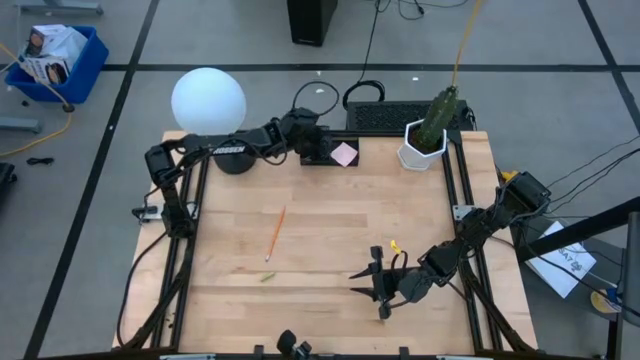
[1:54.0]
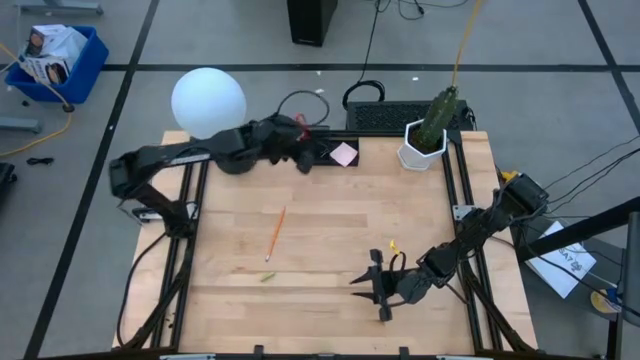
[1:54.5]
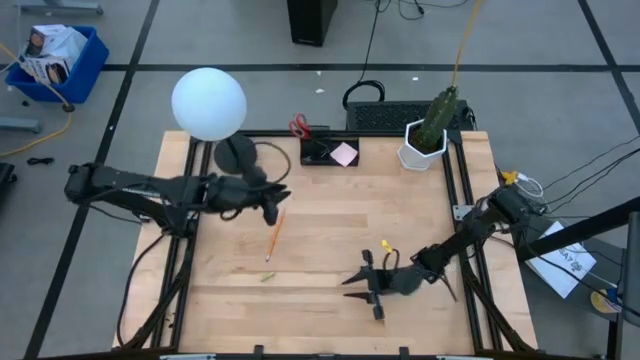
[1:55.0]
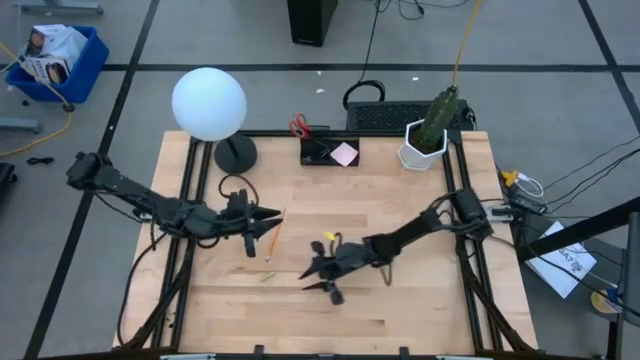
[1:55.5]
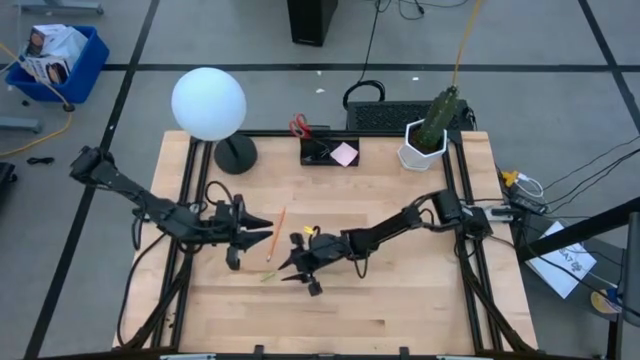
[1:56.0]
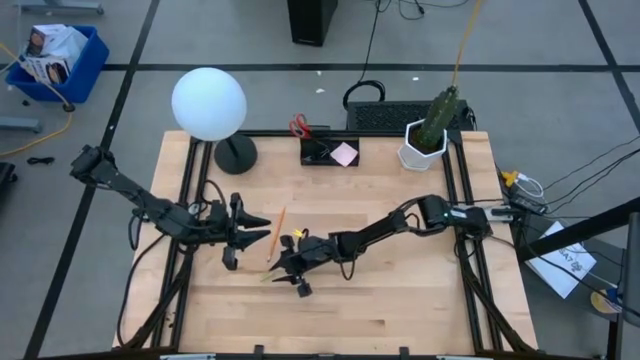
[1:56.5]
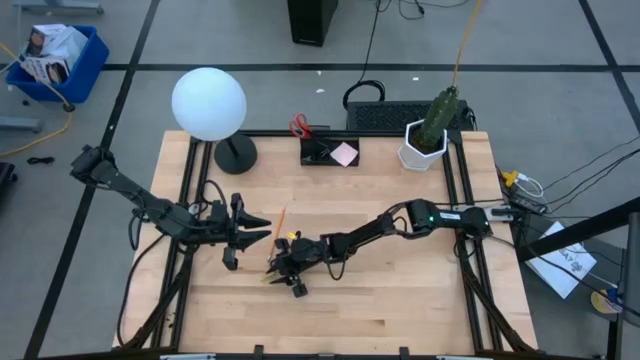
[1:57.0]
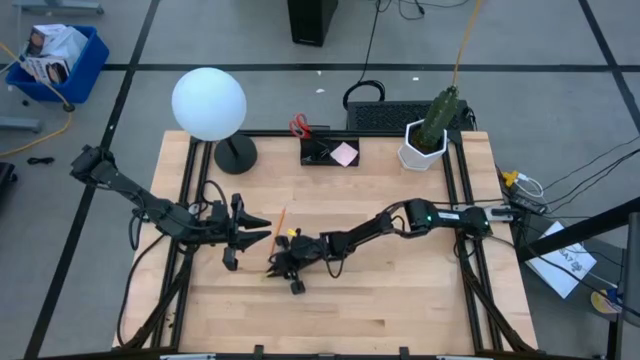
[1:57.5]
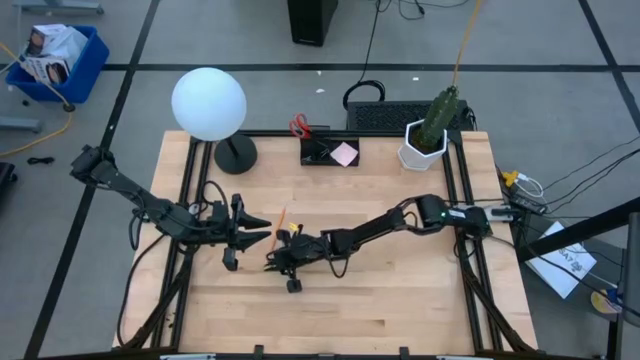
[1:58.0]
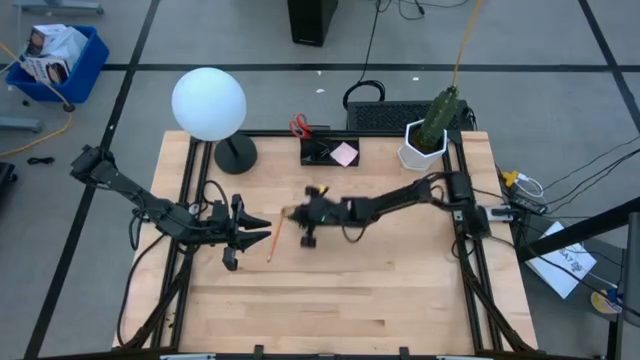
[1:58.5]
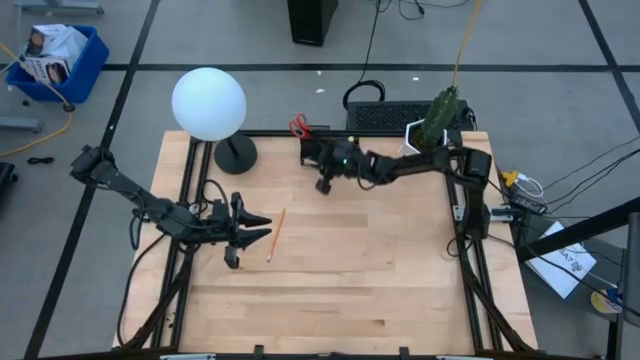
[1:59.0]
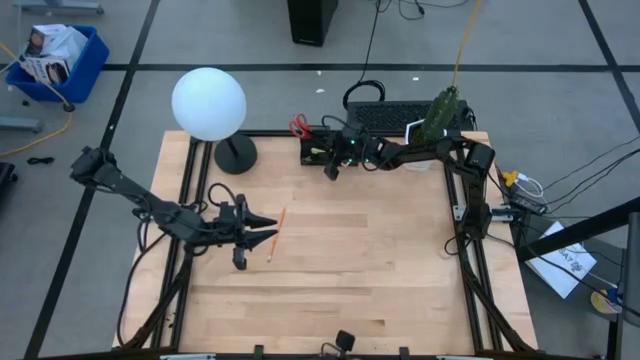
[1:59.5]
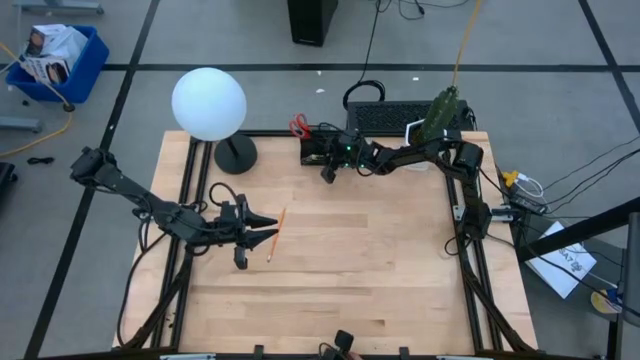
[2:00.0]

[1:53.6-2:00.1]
Task: Pick and place office supplies into organizer
Put the eraser into the desk organizer

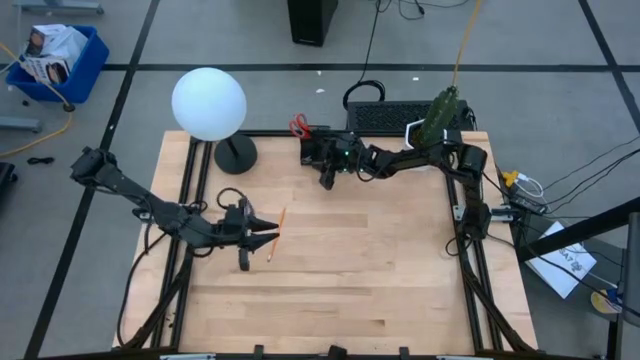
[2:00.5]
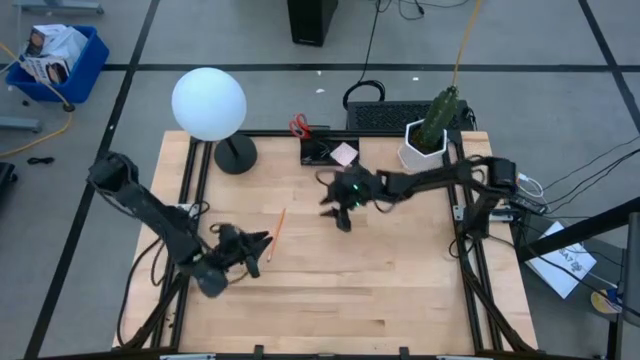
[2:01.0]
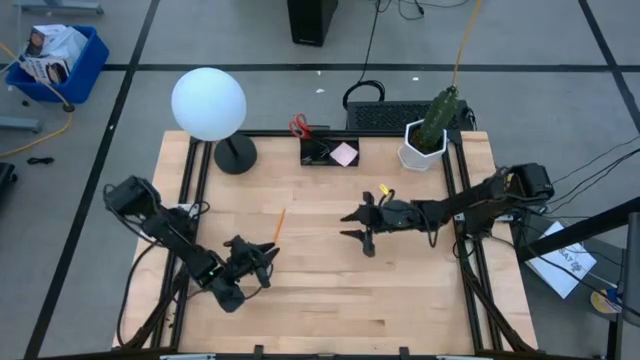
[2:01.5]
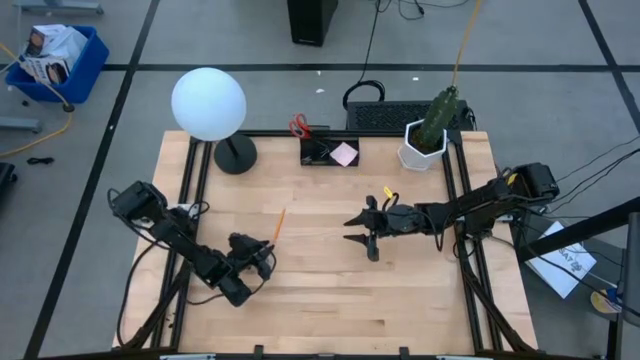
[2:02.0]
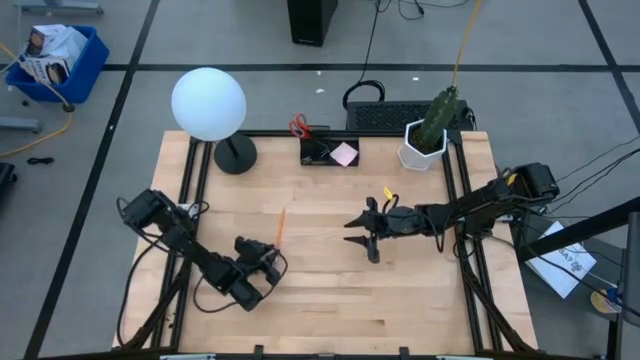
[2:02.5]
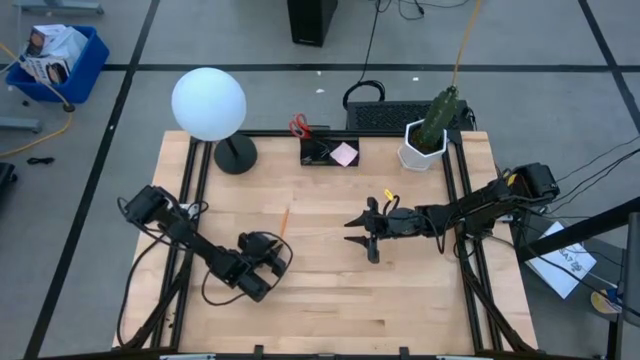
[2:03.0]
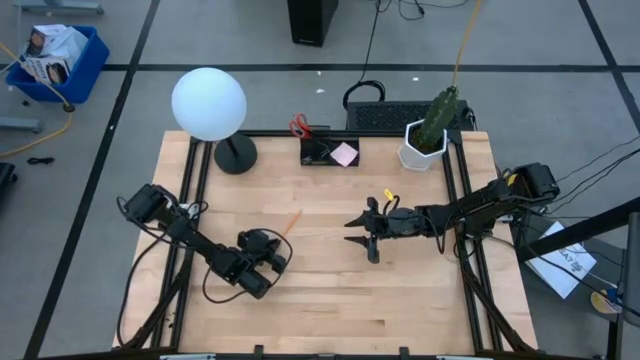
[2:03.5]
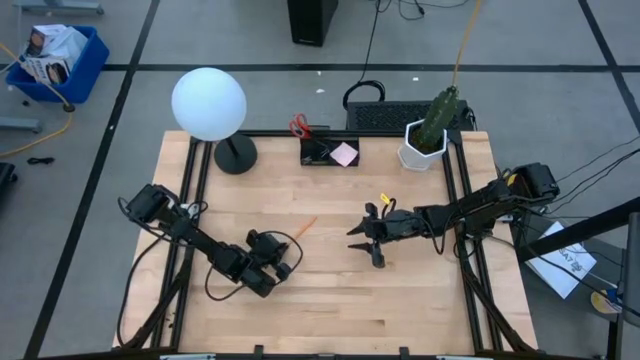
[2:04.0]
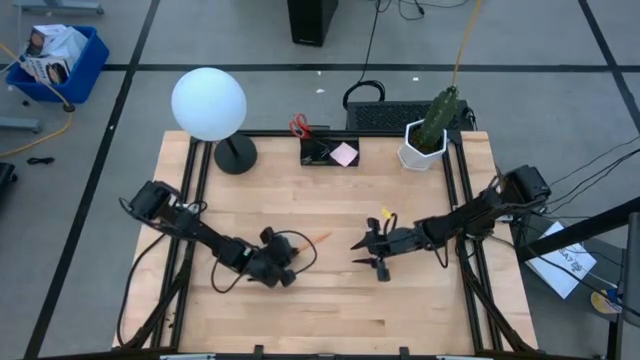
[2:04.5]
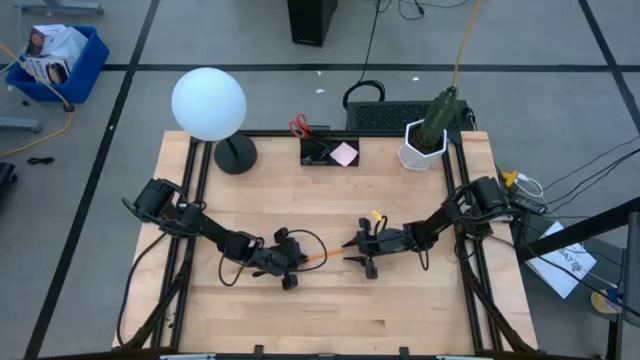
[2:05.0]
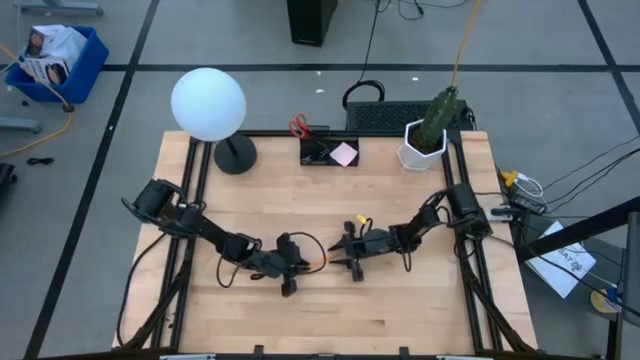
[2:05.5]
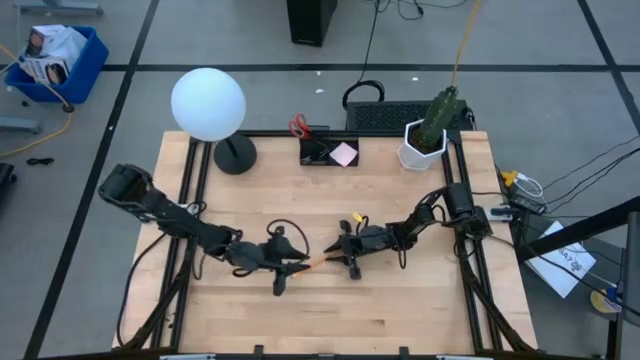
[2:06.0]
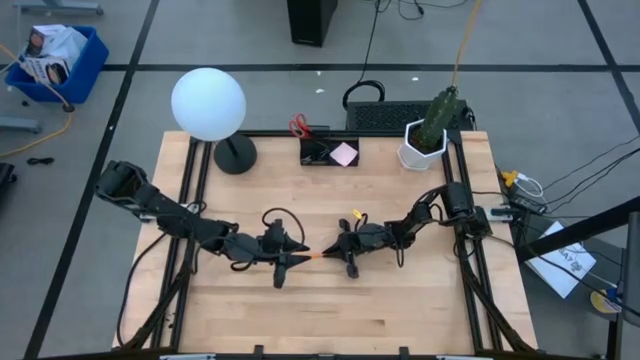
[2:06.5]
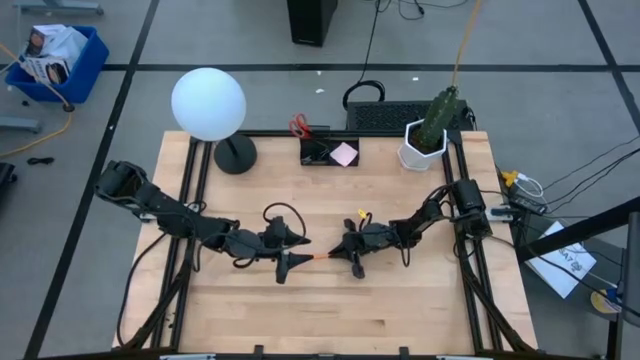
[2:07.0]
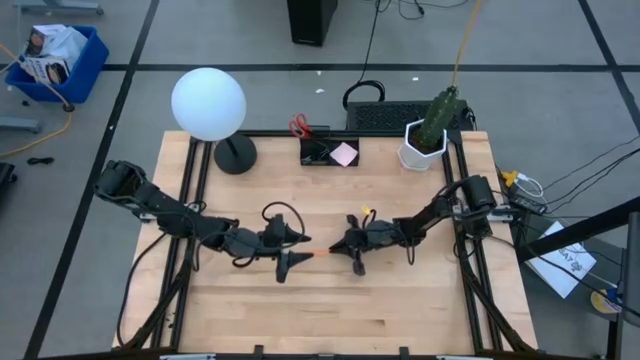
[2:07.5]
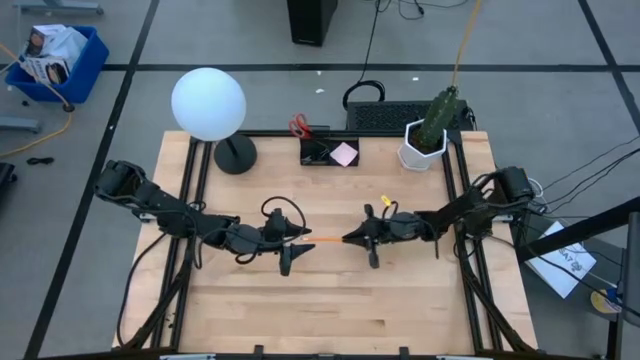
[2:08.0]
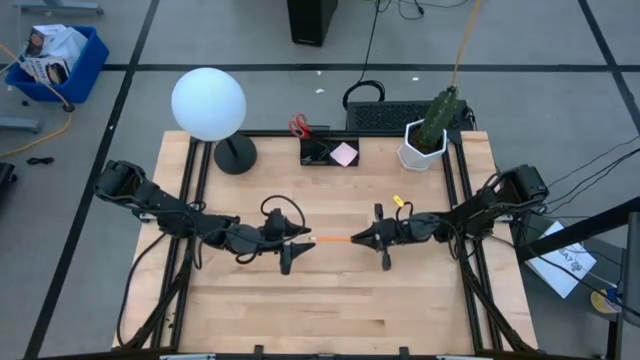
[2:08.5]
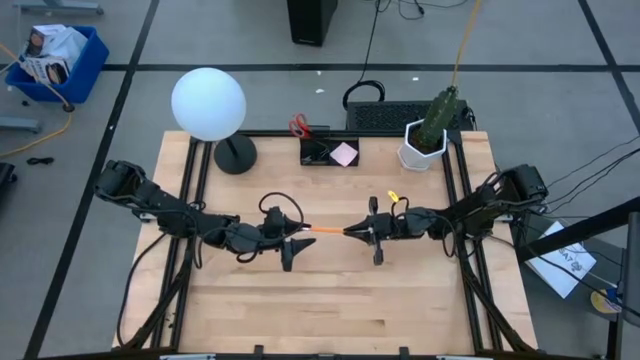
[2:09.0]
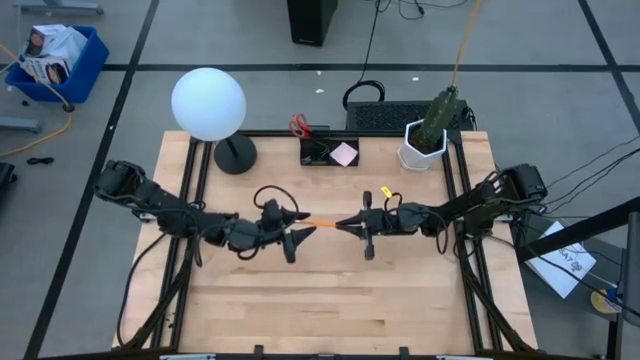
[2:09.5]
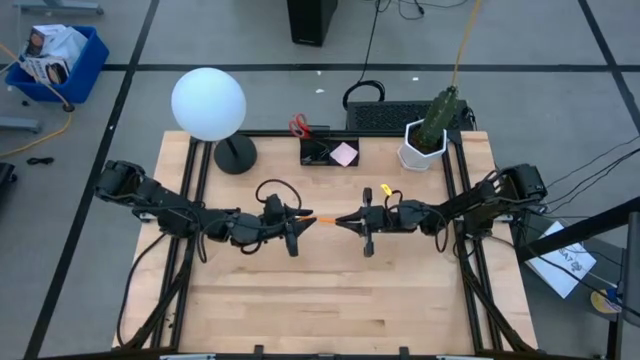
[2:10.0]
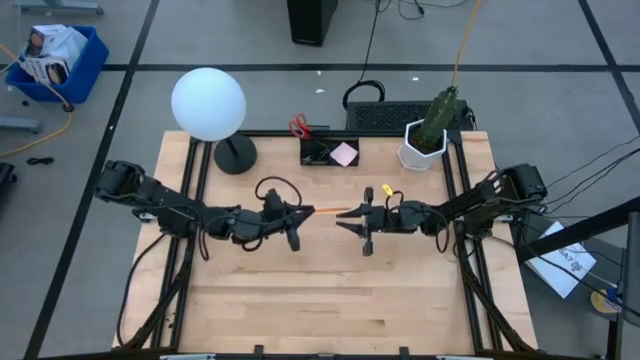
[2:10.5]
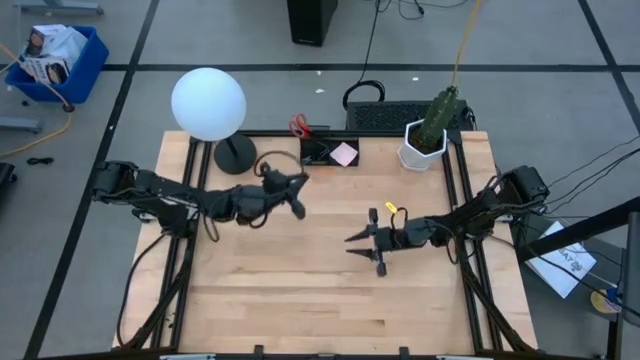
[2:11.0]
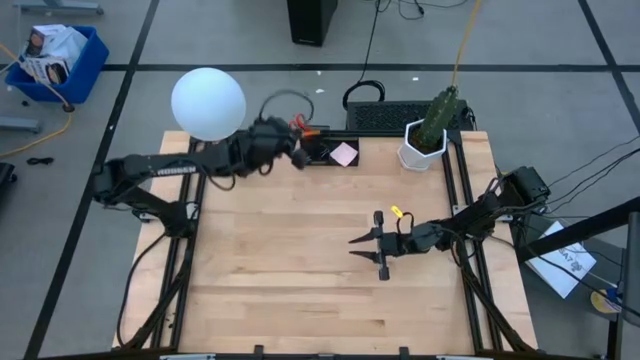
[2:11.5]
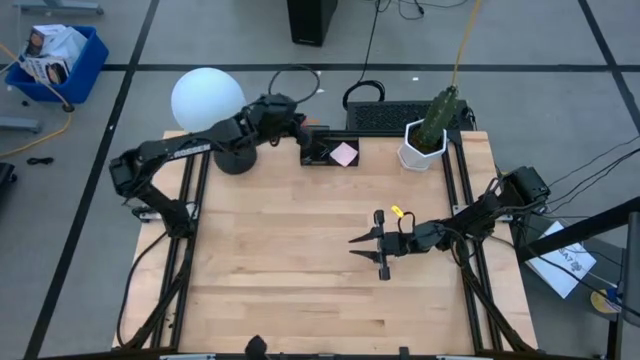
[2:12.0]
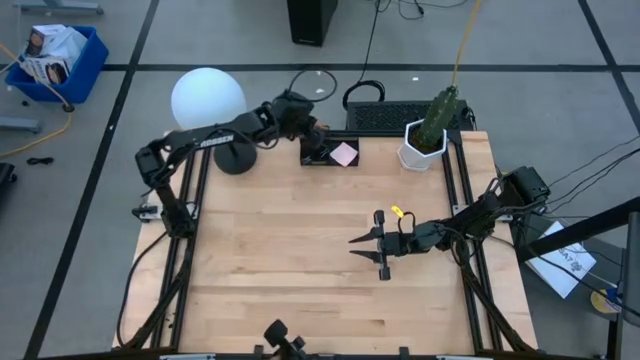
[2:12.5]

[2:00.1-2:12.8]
Put the pencil into the desk organizer
